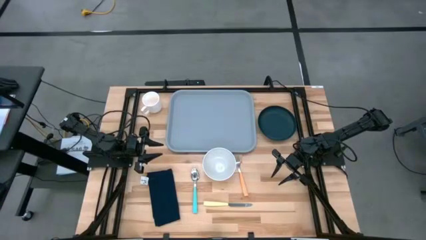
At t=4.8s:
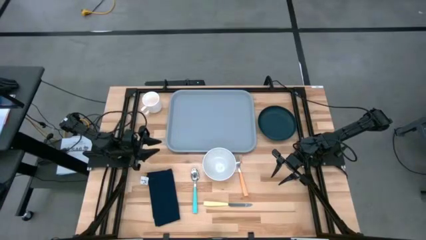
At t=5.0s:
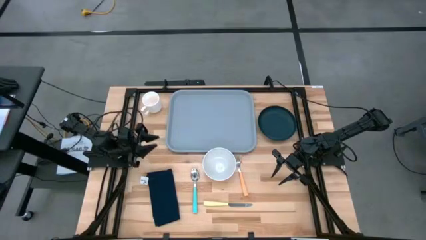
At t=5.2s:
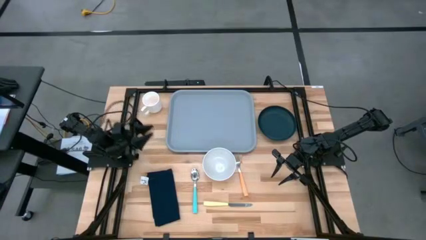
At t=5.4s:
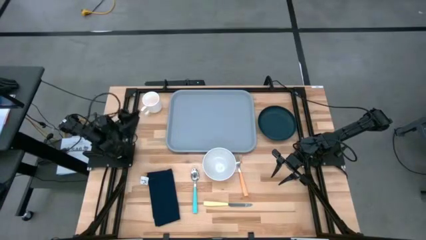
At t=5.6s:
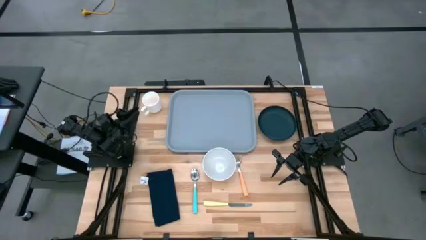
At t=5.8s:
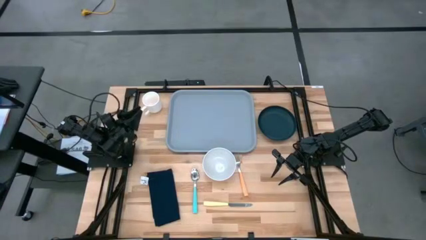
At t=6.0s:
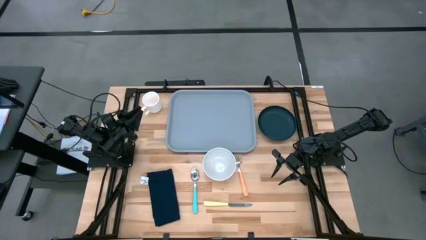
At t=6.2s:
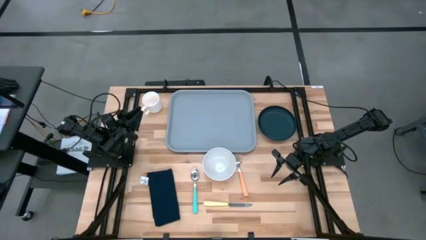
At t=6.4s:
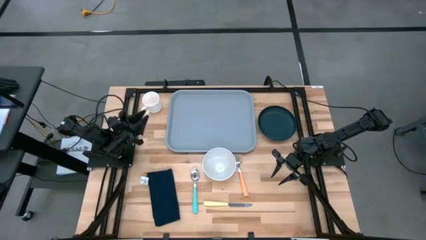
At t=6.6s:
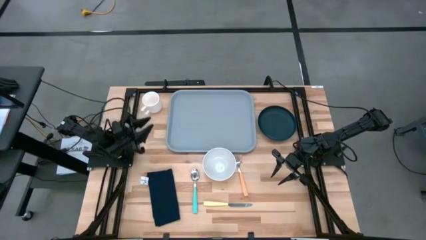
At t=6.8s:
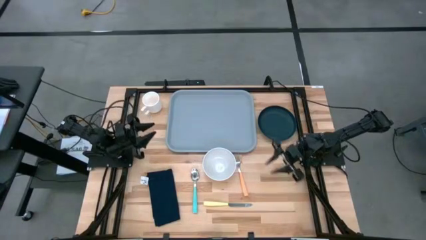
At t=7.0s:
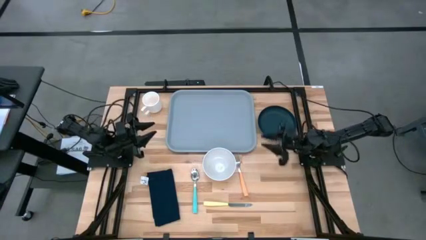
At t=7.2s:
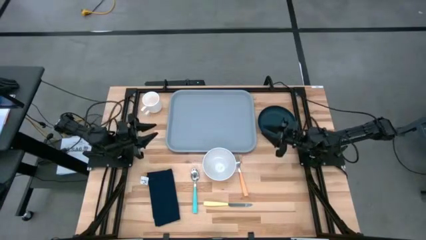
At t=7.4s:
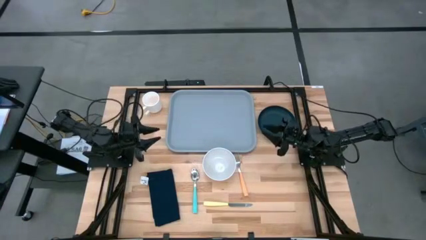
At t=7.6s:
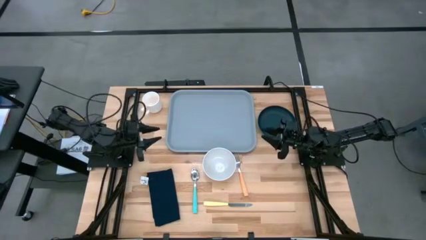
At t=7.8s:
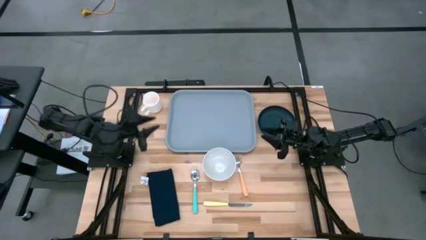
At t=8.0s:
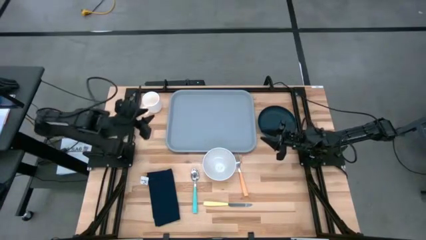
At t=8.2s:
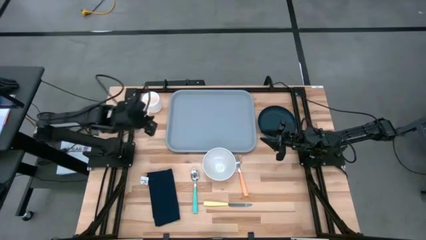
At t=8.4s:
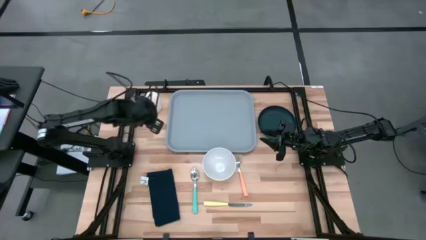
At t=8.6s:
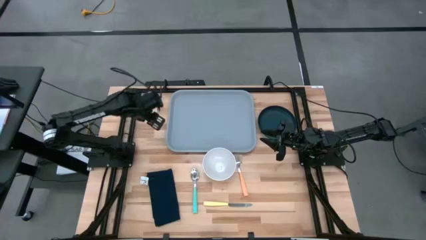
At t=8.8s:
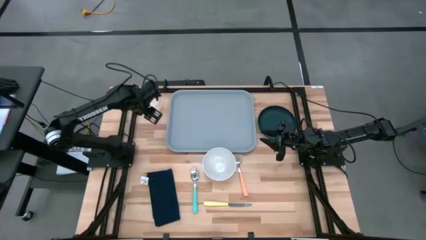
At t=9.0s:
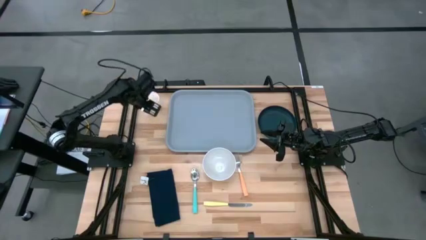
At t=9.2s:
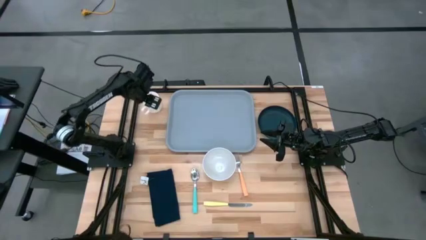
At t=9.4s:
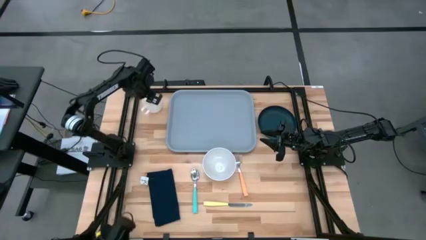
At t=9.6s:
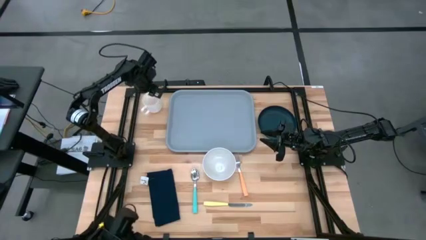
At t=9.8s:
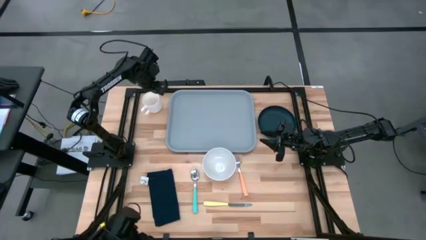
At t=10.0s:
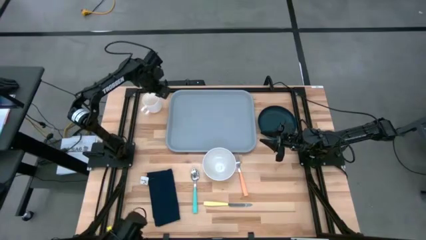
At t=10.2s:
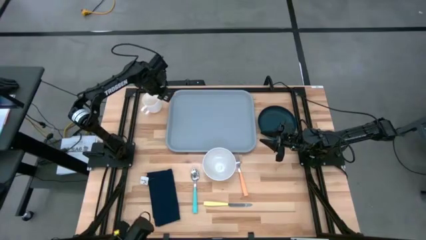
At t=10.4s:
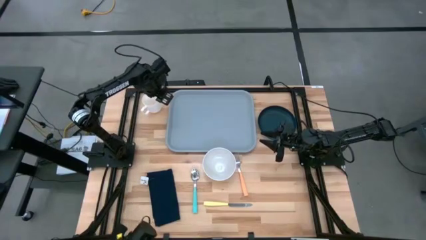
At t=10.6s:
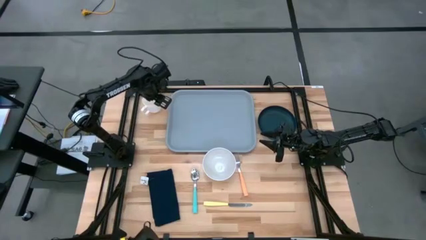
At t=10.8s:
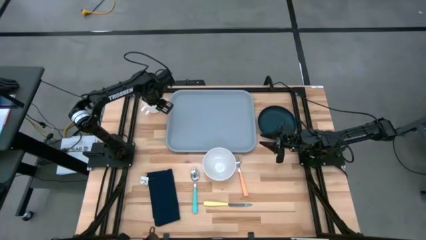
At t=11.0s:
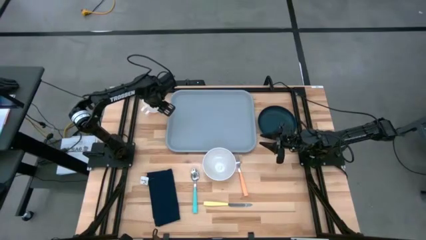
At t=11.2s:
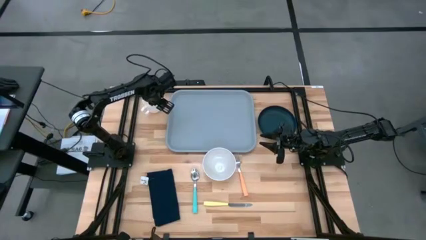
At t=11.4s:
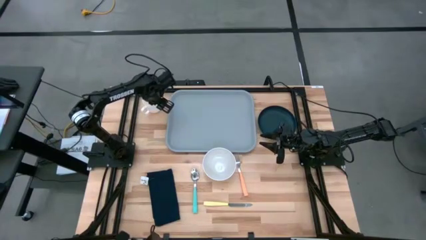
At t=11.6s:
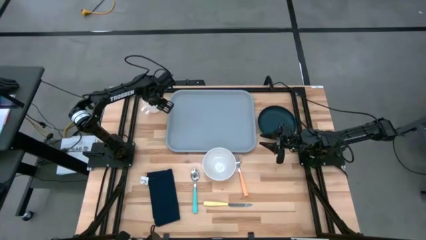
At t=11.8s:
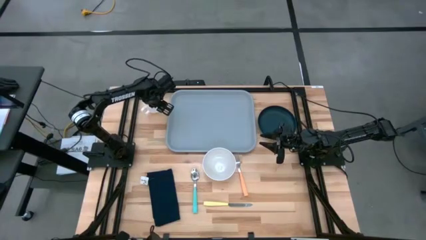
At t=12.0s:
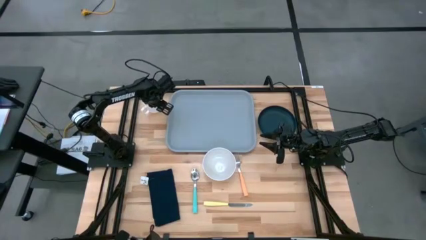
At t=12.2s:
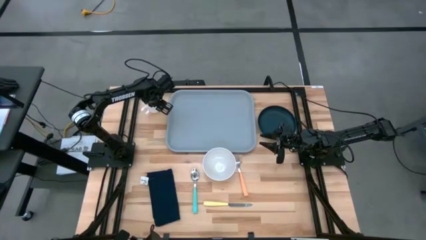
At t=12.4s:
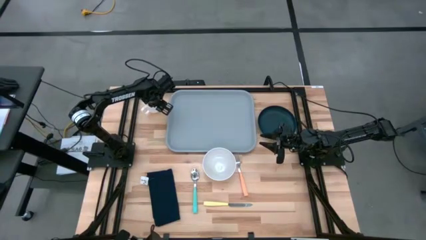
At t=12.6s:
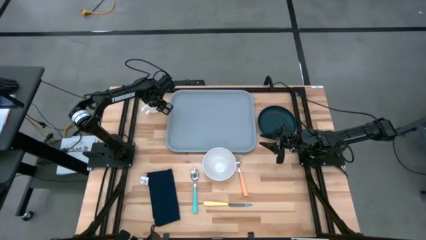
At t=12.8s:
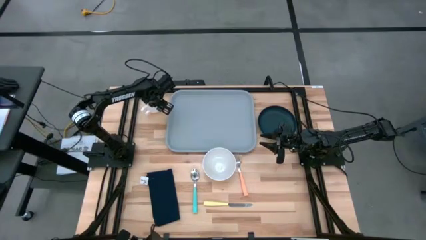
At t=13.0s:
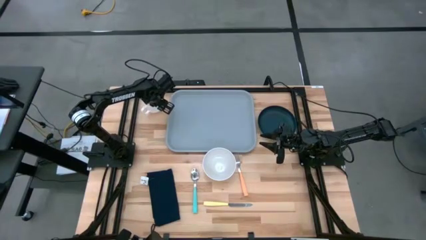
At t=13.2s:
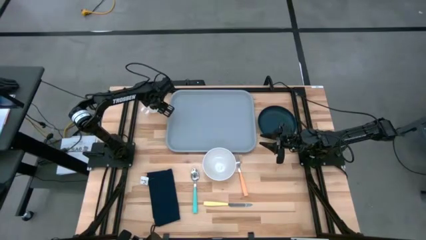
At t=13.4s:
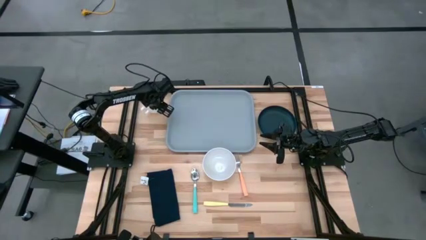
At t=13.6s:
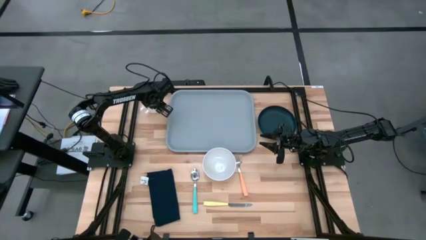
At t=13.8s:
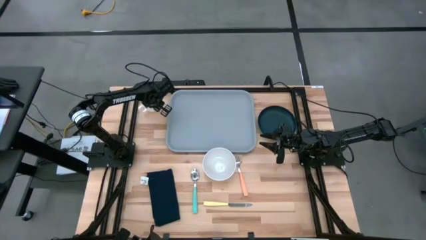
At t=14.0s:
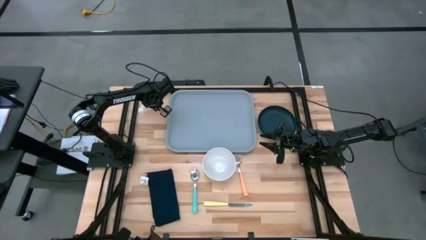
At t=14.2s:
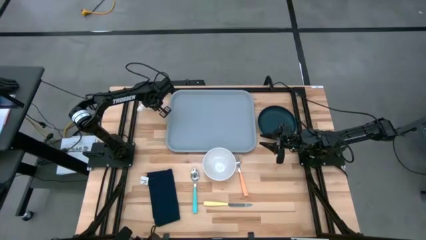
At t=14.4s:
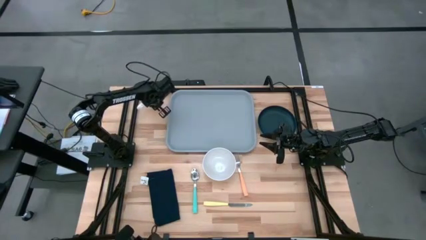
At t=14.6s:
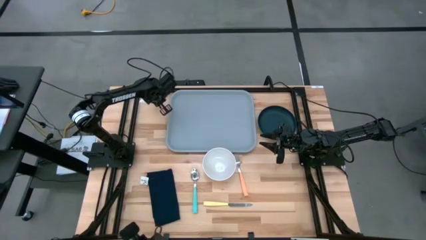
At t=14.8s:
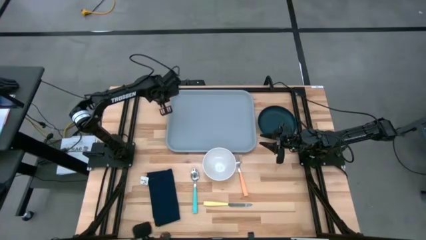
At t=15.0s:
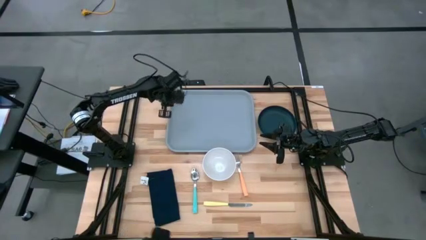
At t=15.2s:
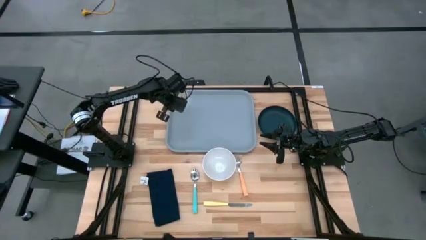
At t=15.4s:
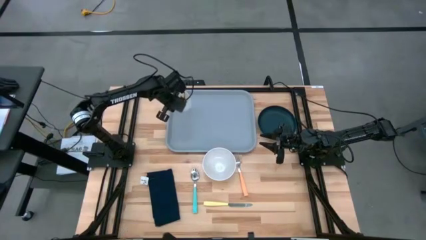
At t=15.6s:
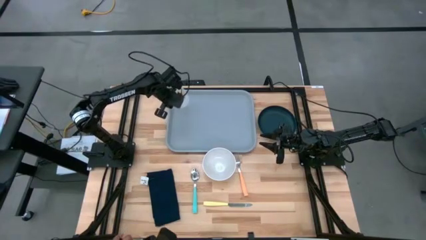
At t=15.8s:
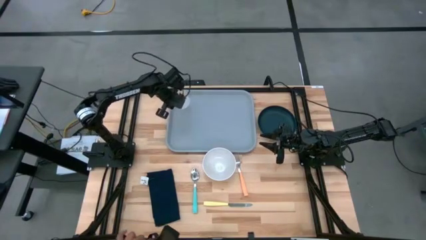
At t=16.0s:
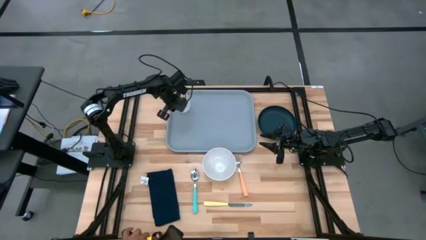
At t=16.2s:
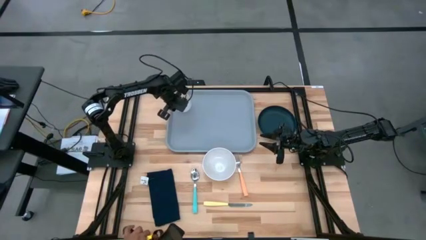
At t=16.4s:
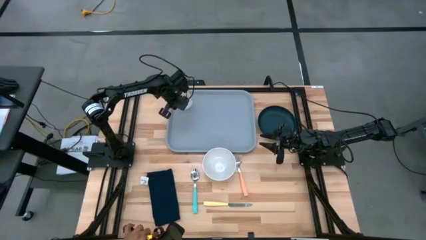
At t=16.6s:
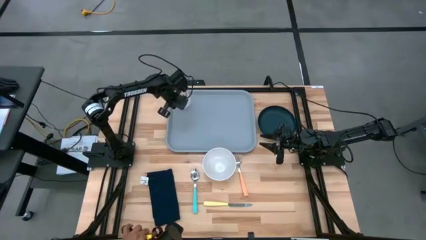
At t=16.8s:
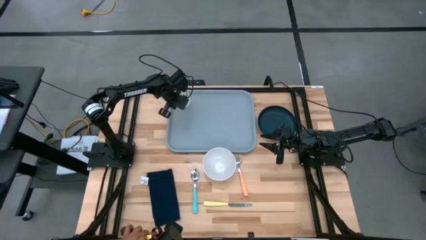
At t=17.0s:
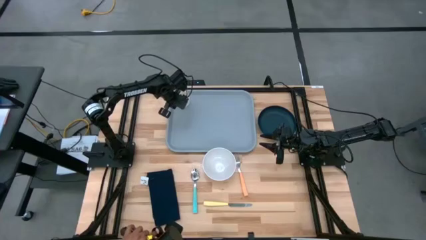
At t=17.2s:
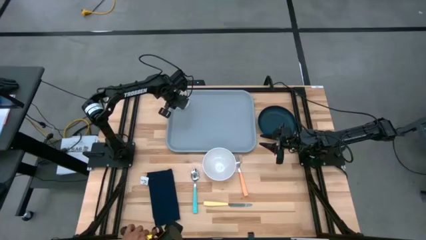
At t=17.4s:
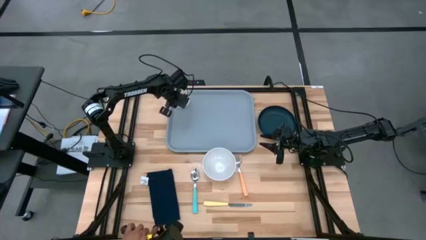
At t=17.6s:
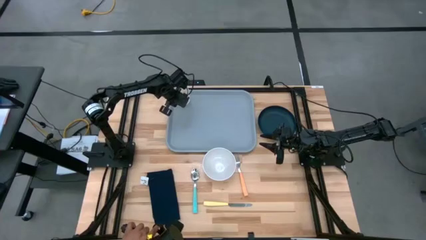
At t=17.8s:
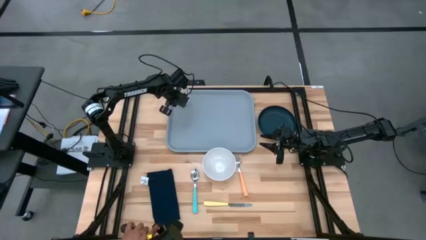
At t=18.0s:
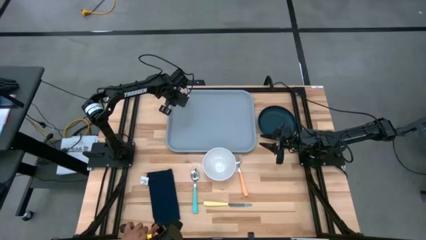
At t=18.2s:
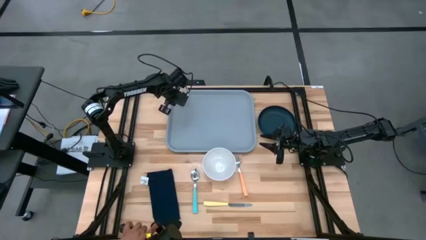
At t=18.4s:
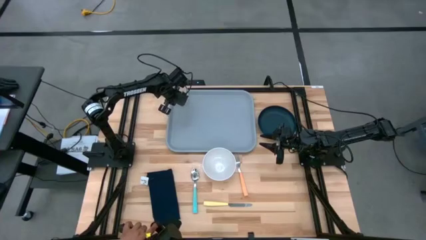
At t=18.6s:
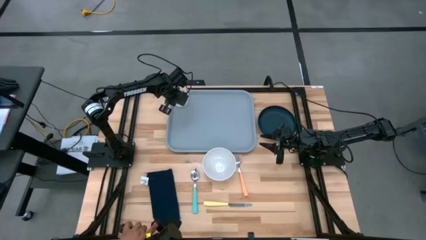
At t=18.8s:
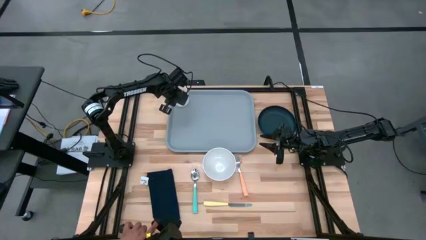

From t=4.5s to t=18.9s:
Task: Set up tray
Put the white mug on the gray serving tray
